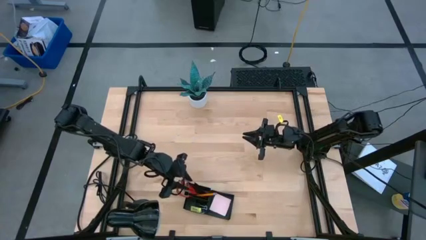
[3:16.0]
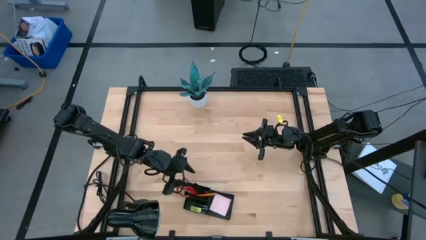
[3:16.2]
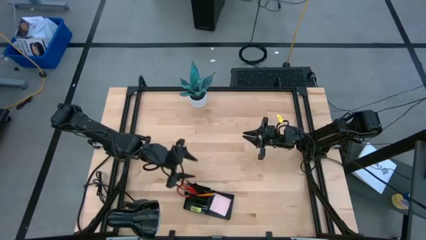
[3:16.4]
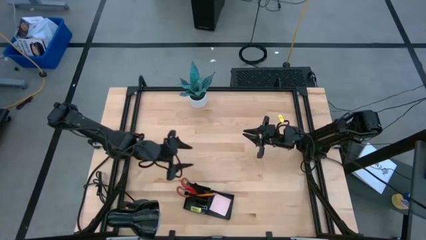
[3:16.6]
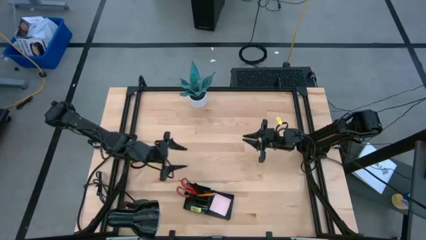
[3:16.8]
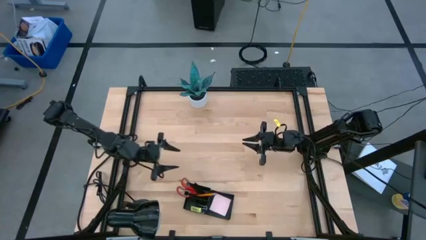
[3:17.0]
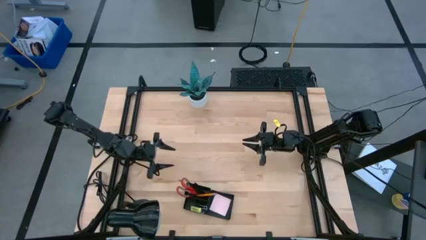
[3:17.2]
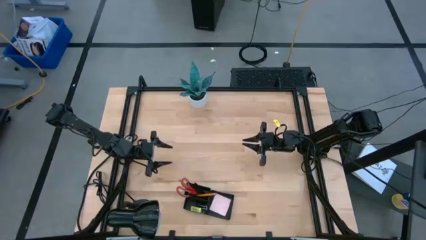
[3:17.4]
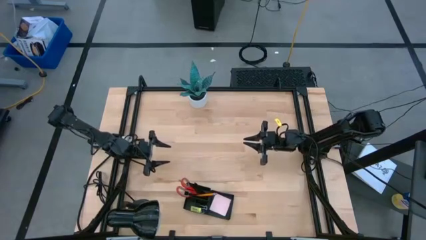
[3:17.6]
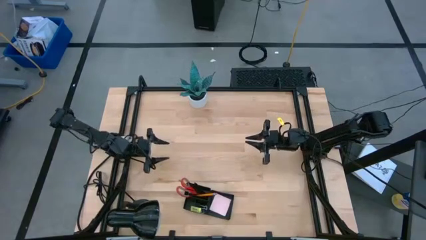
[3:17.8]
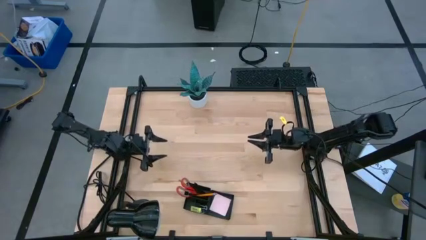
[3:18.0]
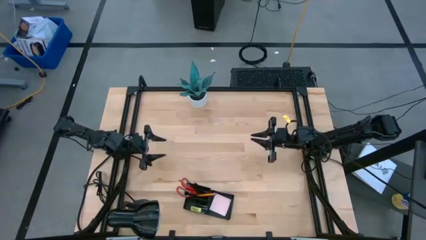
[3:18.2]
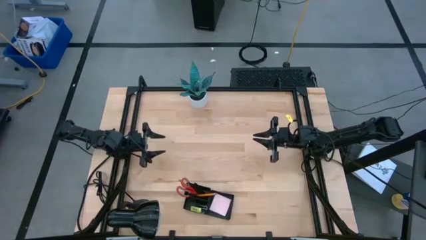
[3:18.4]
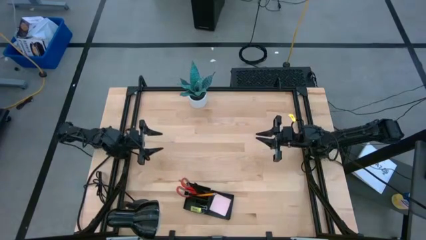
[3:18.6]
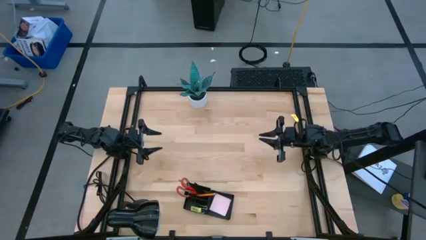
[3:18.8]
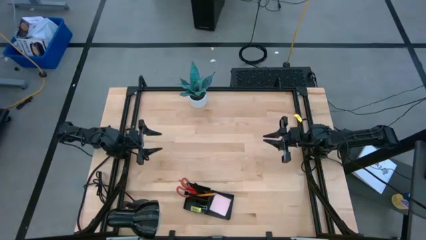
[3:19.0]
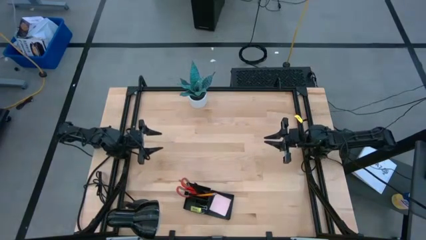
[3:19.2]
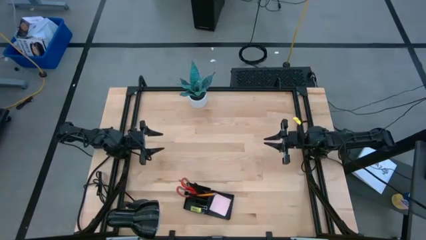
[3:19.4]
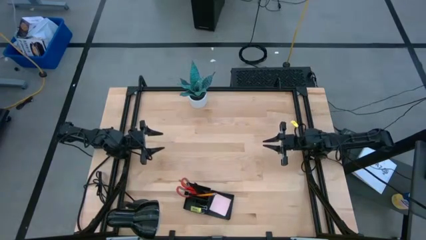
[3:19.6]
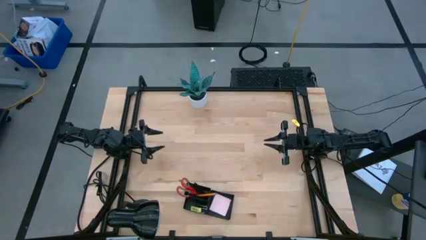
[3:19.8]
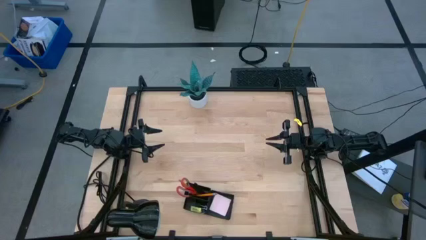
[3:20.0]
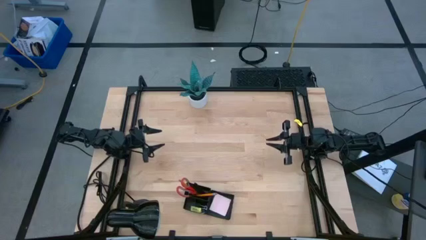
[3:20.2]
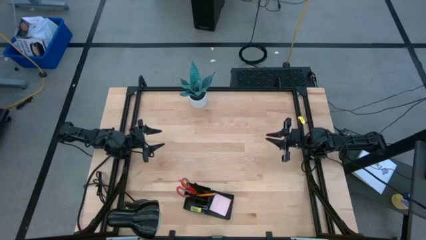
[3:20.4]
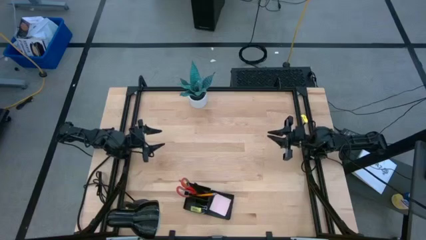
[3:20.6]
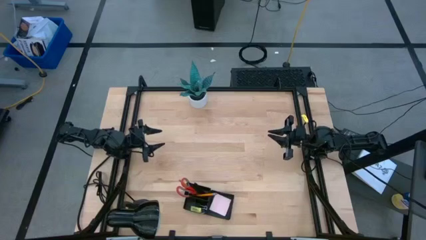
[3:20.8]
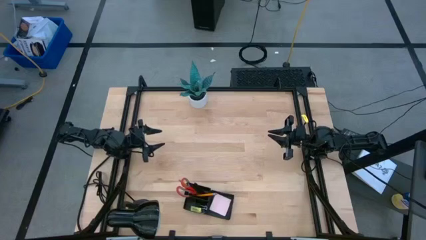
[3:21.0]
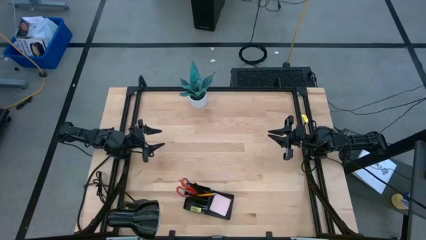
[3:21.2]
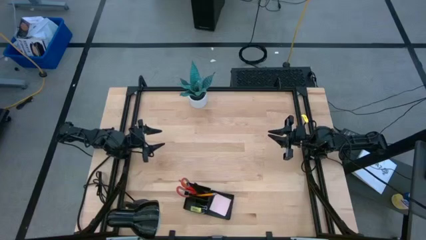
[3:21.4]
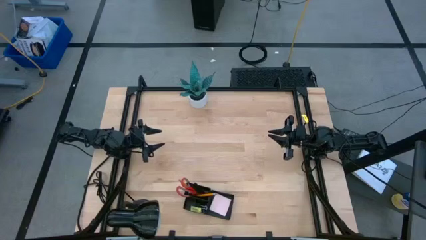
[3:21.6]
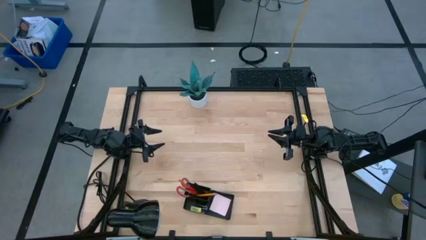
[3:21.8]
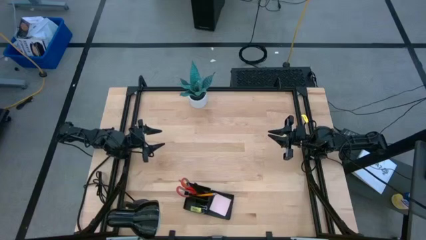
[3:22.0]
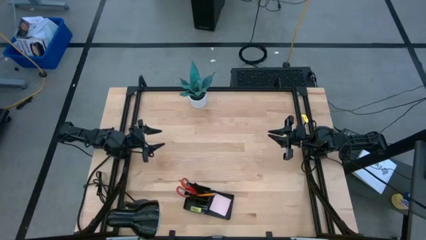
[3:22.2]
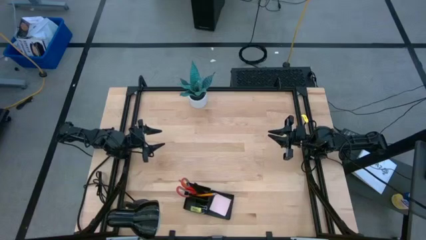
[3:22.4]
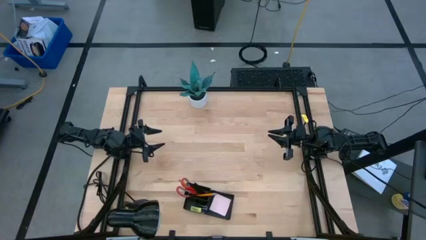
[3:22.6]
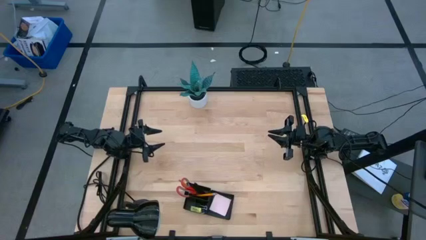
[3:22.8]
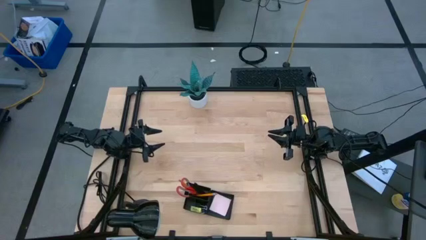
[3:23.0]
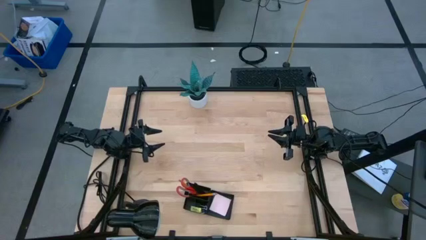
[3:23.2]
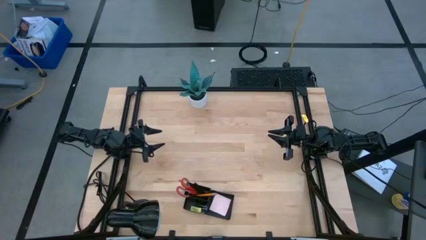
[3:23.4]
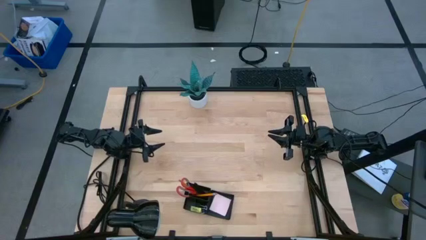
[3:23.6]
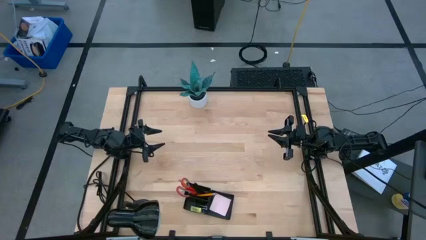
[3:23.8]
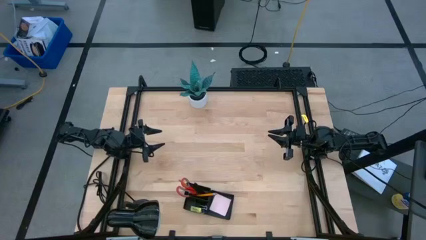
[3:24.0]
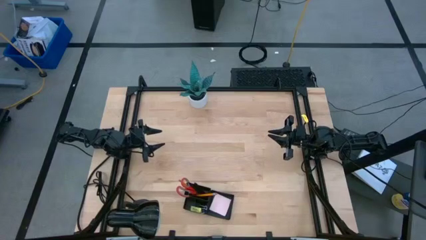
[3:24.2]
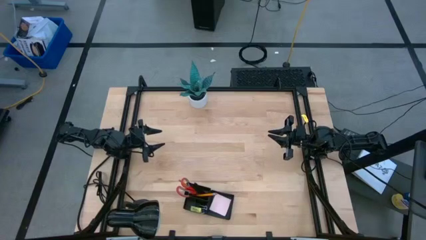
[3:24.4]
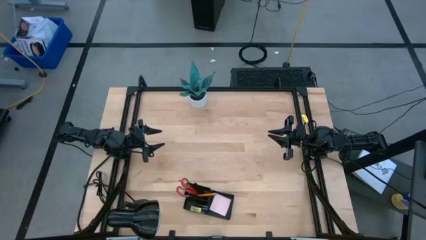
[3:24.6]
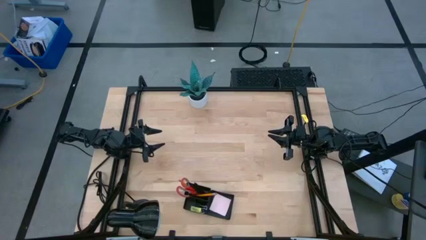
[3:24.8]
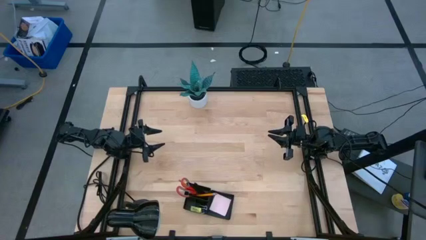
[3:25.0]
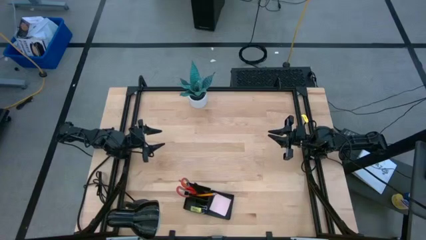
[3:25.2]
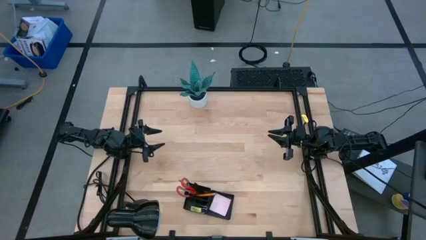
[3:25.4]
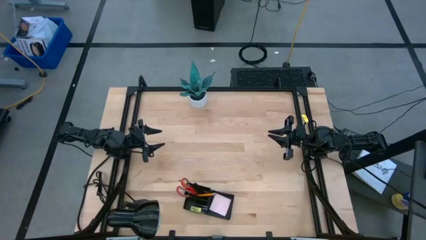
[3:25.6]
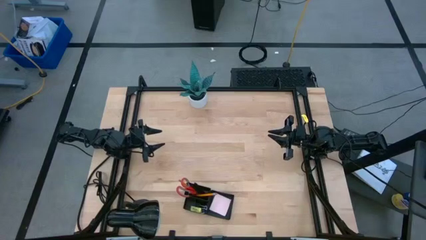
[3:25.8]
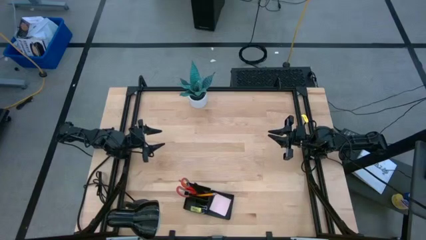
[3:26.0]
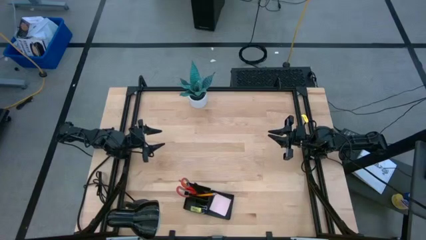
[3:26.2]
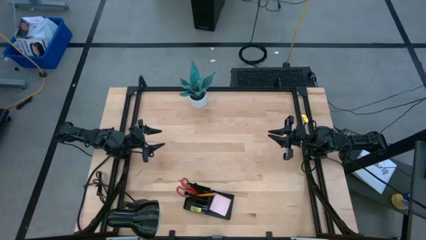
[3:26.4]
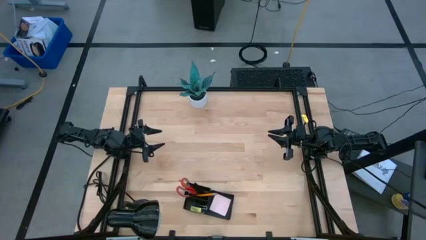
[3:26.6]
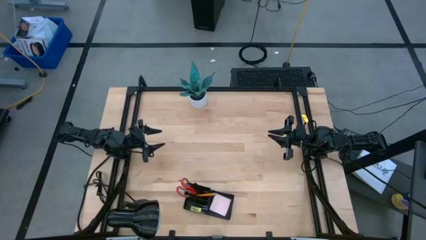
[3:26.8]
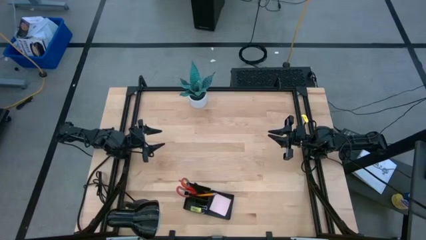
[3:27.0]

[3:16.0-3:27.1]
Task: Pick and place office supplies into organizer
Return to Home Position

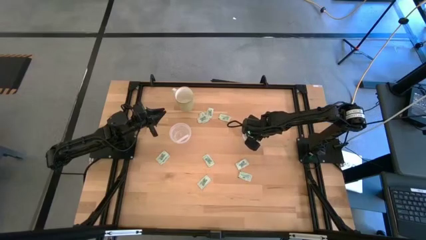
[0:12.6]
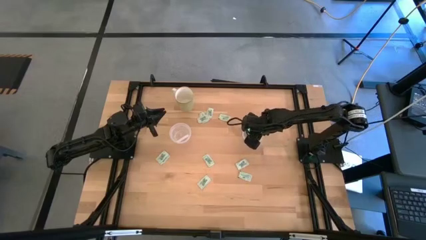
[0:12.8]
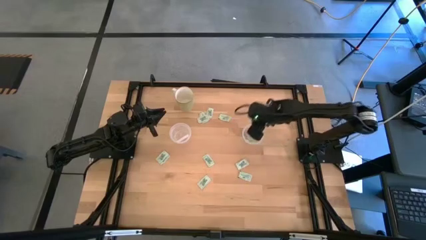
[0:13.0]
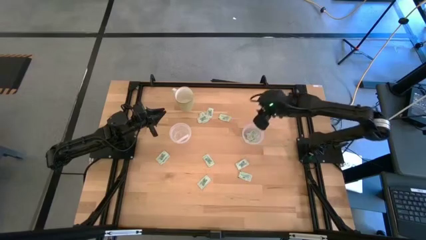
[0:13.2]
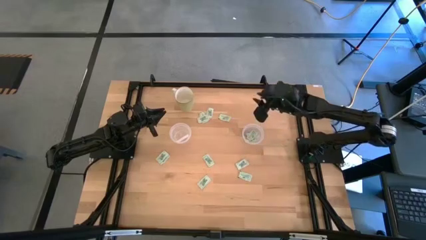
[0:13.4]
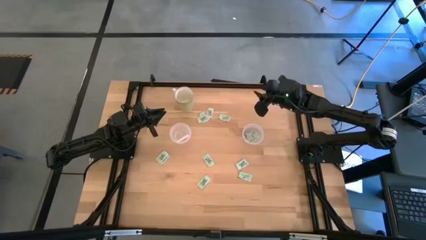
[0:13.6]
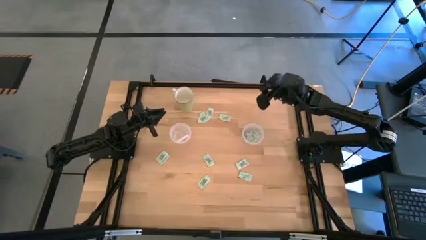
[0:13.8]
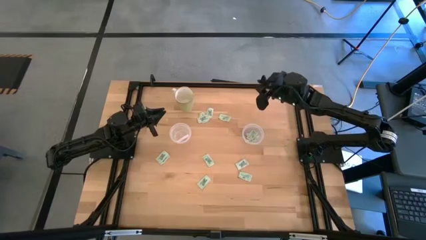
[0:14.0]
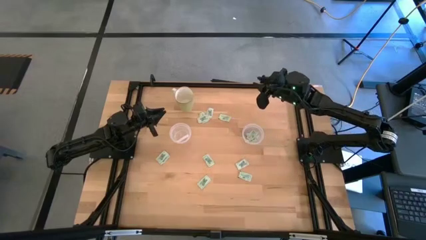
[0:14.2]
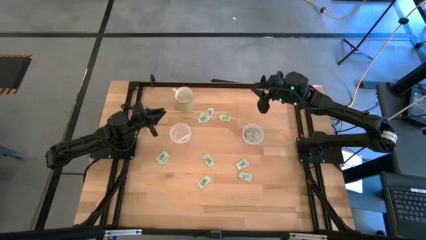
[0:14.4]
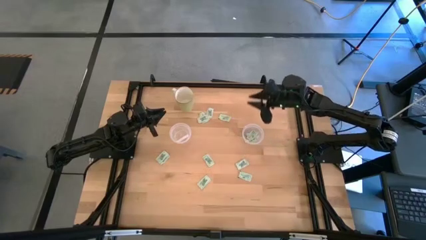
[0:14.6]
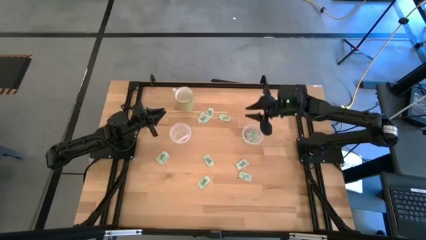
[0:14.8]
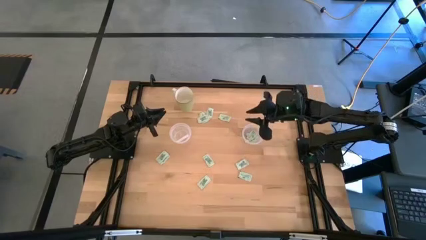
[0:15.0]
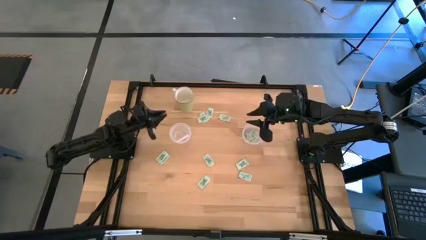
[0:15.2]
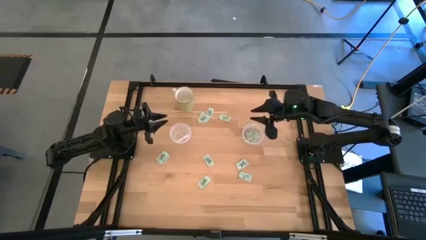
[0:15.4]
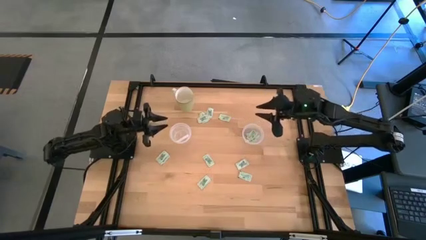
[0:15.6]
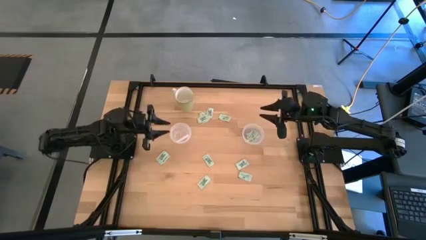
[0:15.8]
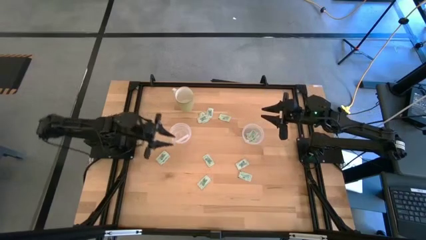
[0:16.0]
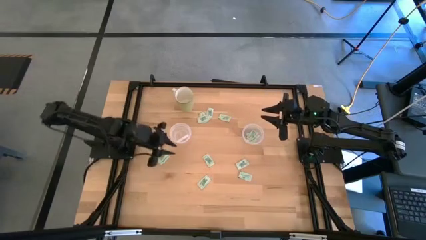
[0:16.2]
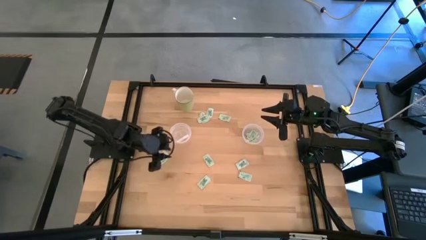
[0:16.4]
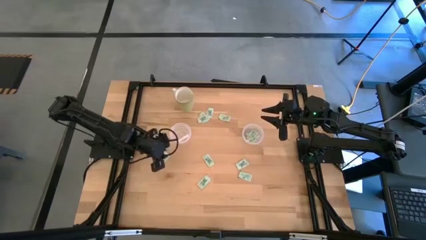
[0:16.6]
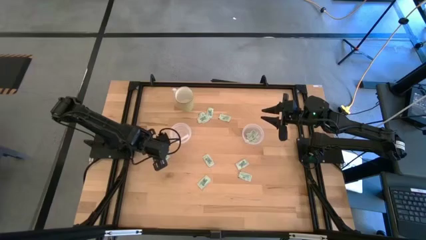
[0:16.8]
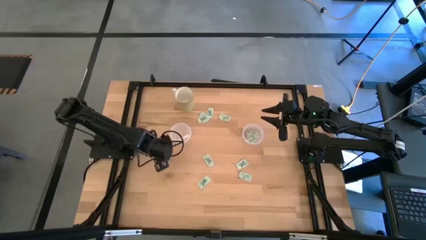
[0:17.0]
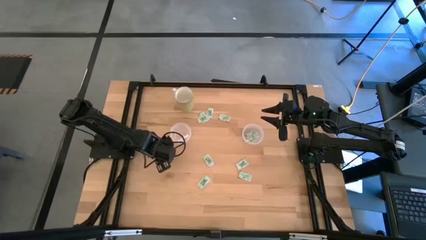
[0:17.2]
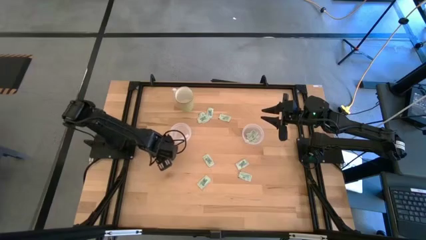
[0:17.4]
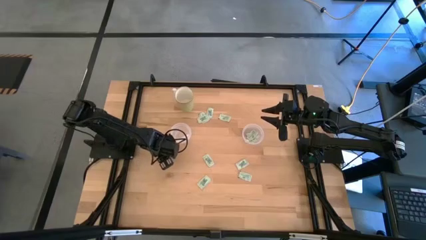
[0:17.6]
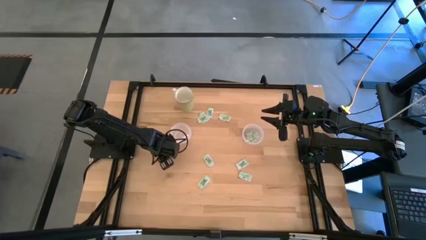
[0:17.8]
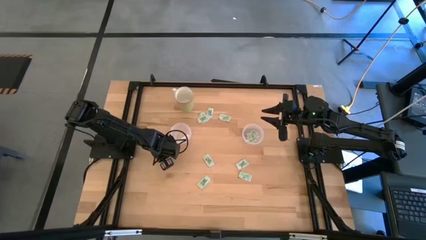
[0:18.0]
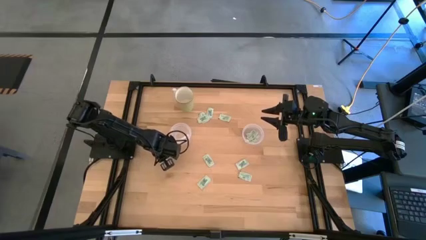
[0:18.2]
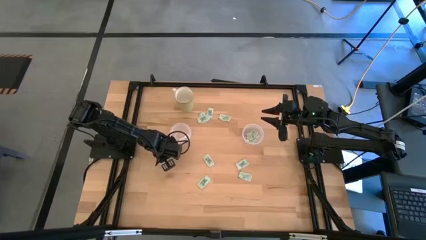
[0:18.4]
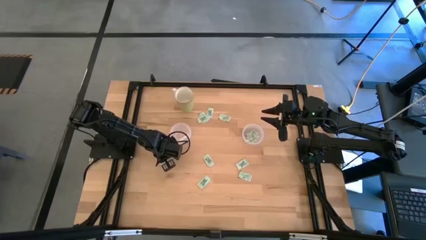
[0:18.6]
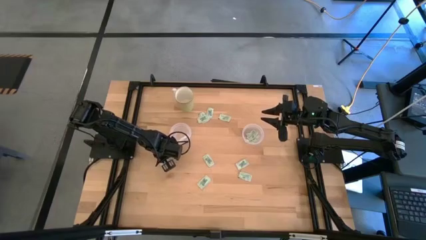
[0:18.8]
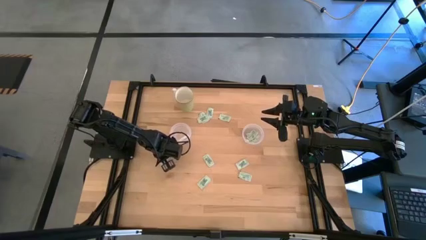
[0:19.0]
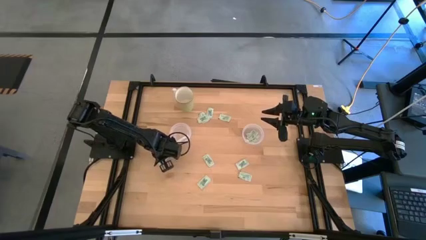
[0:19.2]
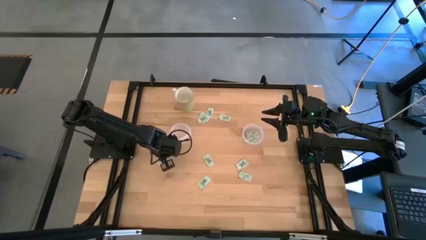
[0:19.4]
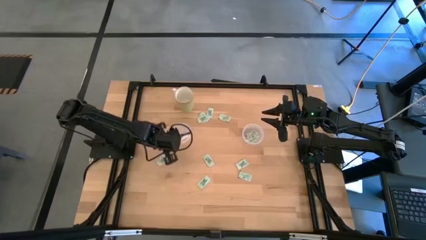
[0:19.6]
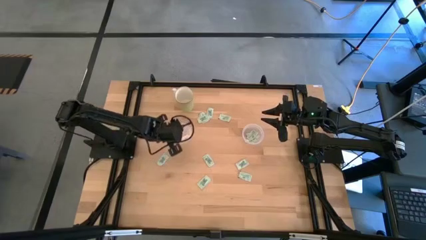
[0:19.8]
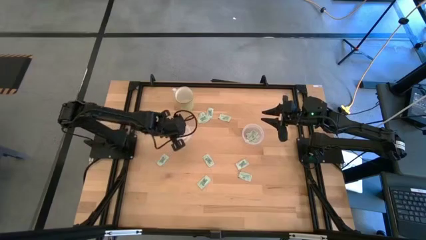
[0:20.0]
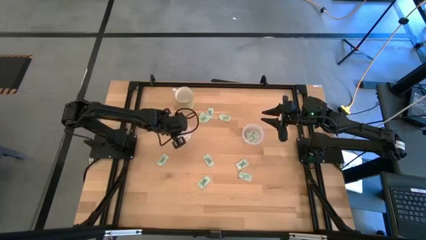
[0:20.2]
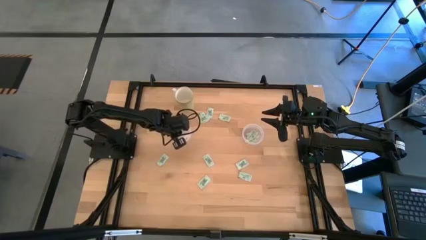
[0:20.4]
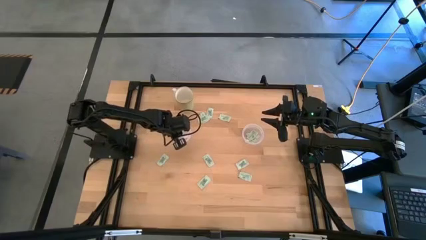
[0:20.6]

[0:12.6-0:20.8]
Task: Pick and place Stevia / Truvia into bins
Put the stevia packet into the left transparent container
